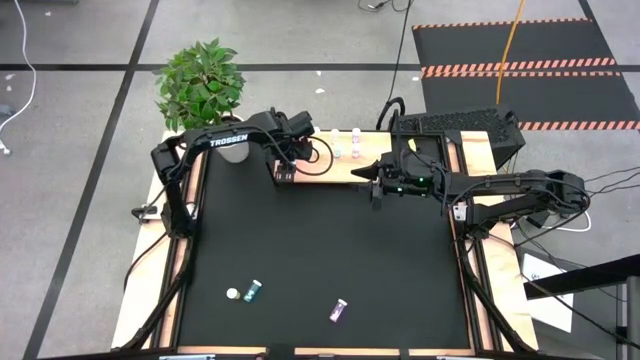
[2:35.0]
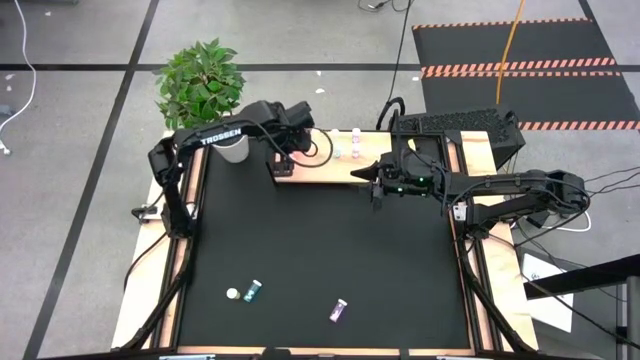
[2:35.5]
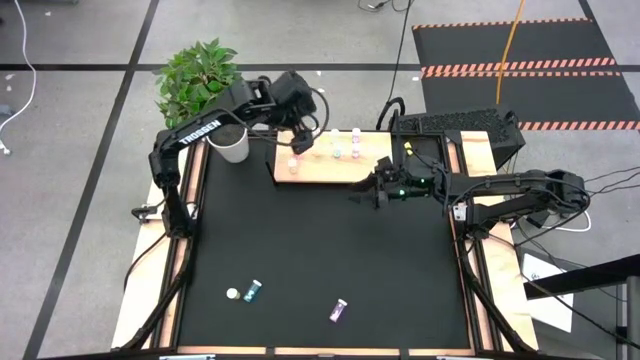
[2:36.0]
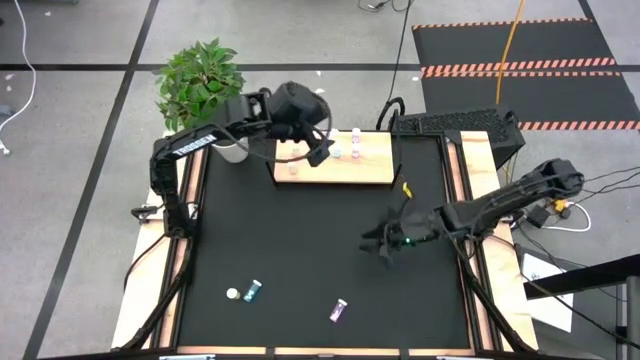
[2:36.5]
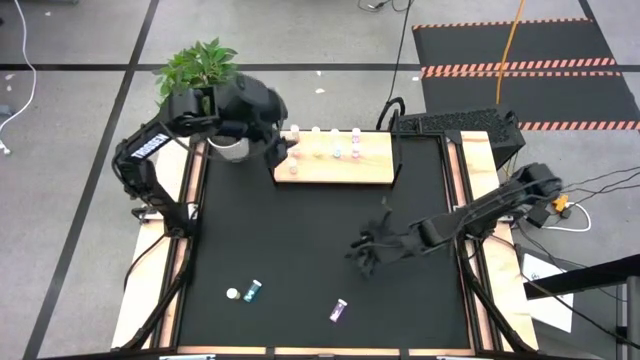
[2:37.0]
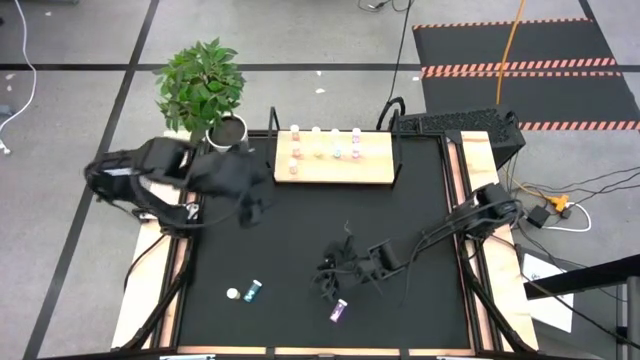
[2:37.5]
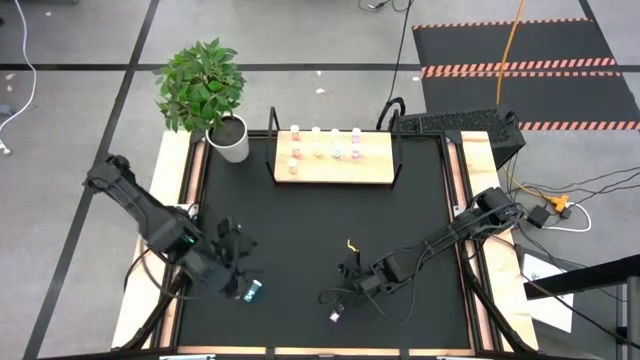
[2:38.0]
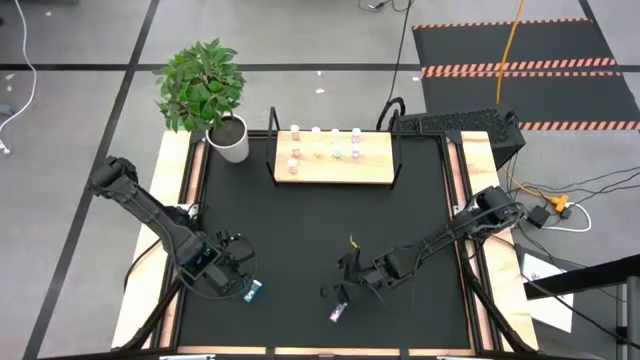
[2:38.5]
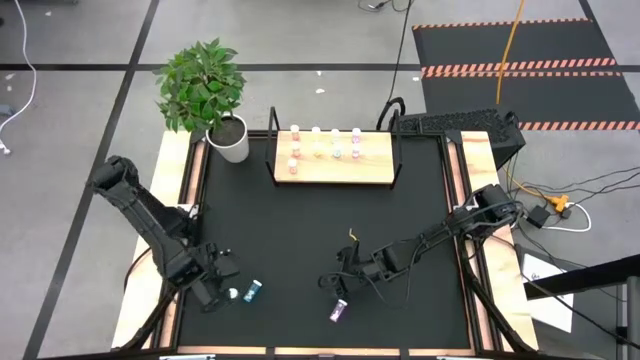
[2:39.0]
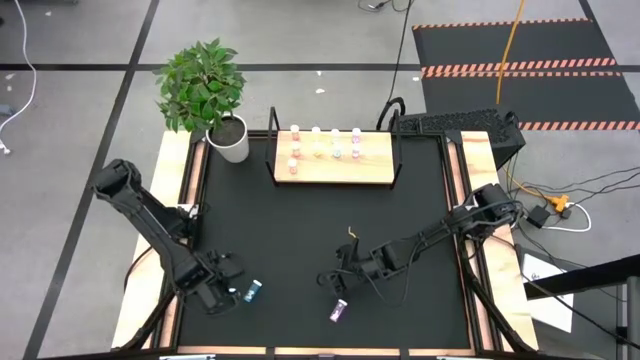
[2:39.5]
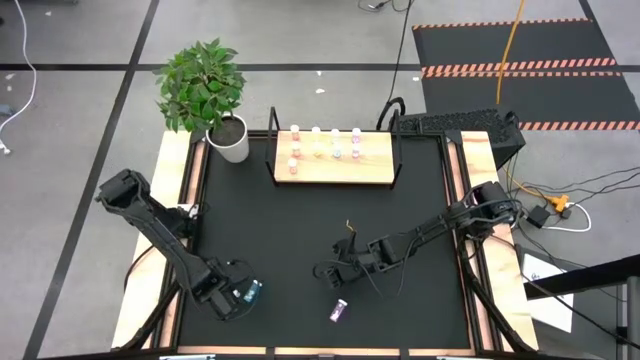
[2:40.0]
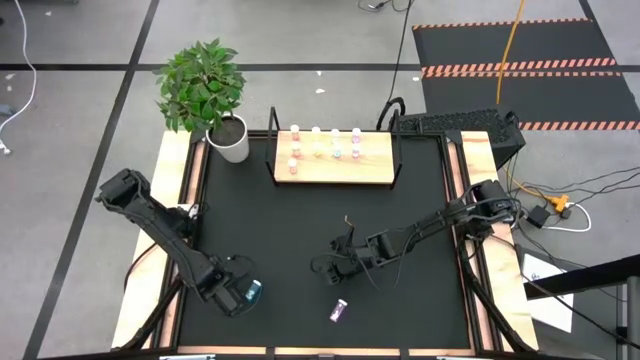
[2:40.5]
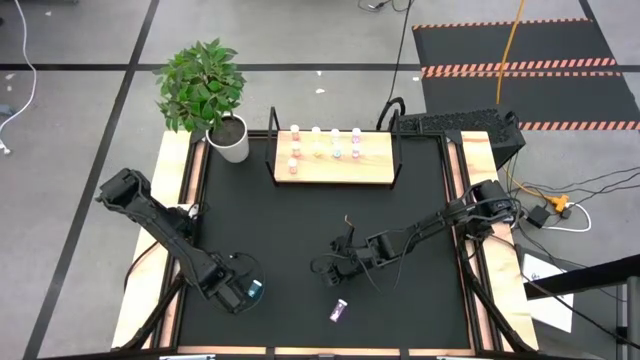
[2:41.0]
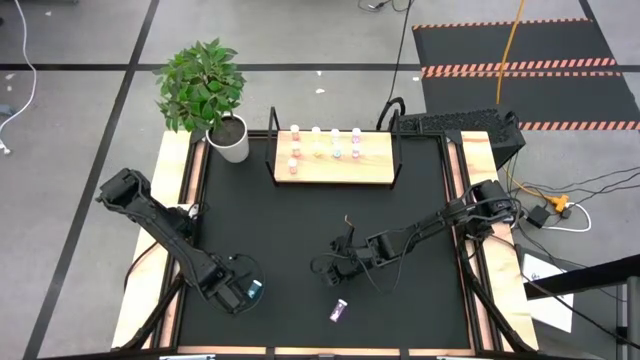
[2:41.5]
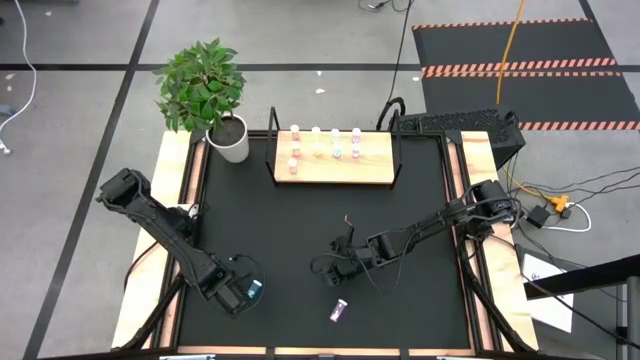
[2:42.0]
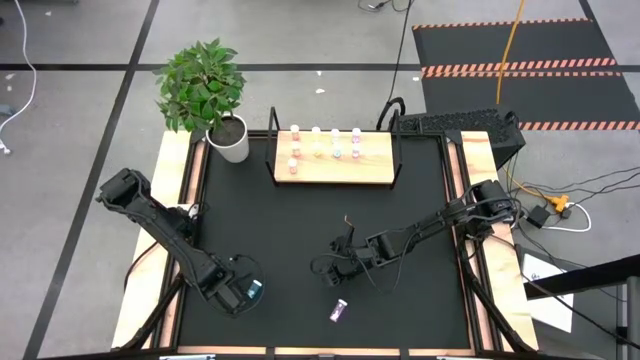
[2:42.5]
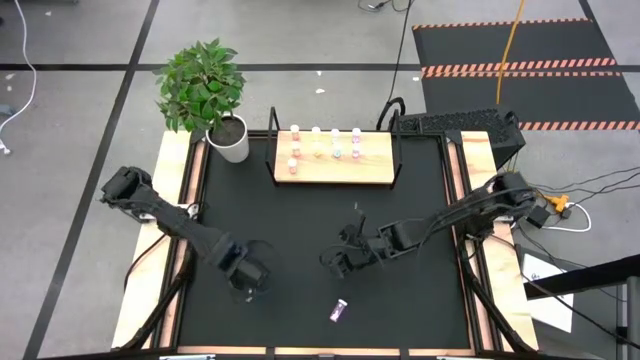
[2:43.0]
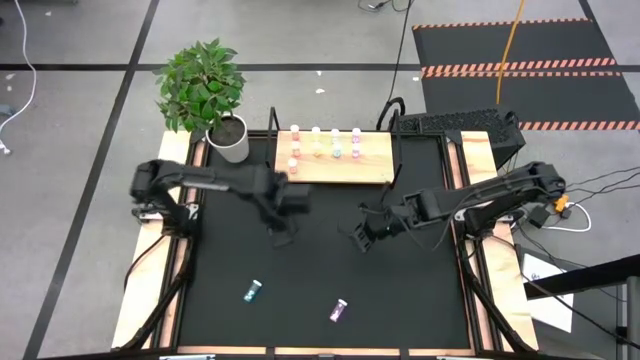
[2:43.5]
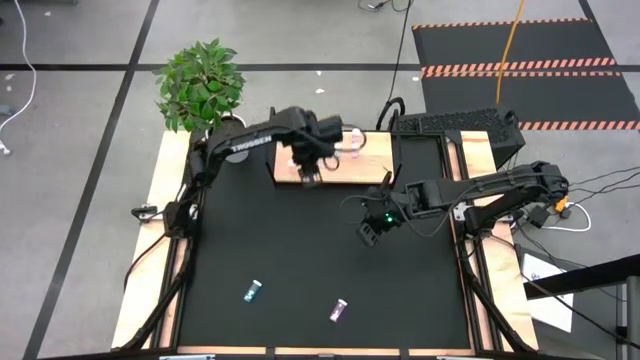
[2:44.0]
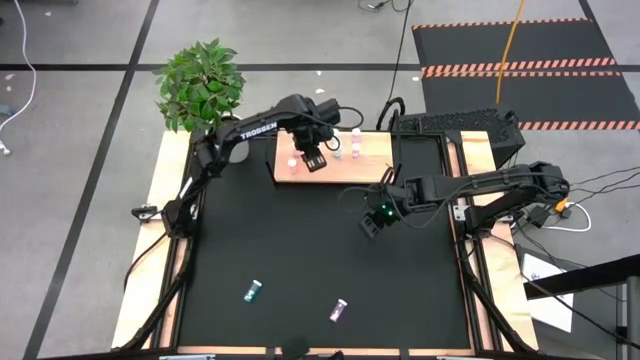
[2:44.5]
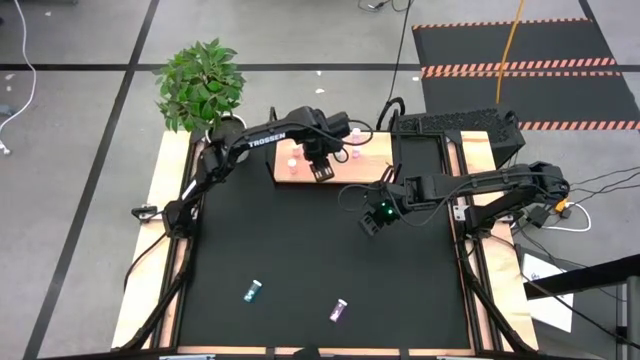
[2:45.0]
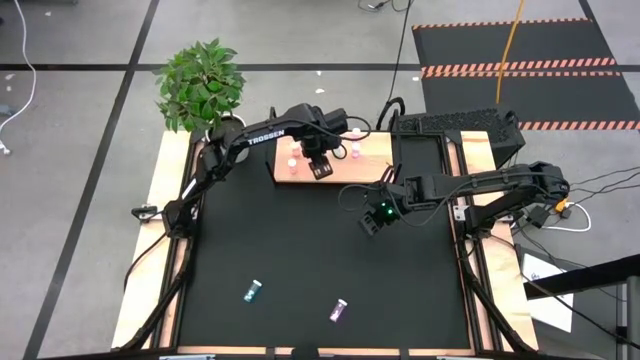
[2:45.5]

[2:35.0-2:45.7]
Task: Pick and place medicine bottles onto shelf by color
Put the yellow pill bottle on the shelf aligned with the other yellow pill bottles

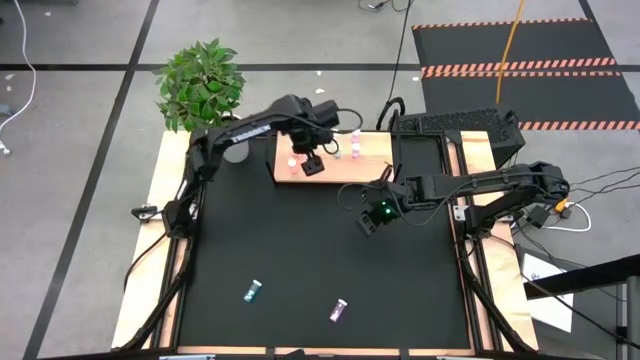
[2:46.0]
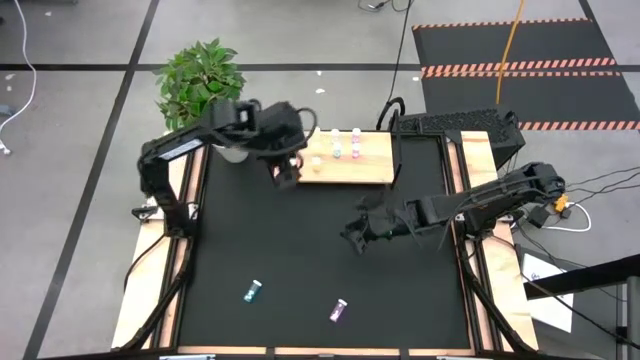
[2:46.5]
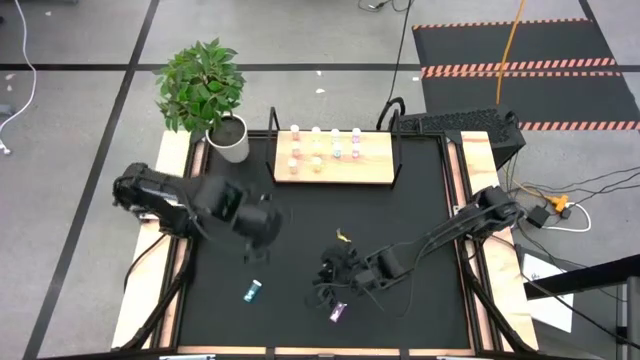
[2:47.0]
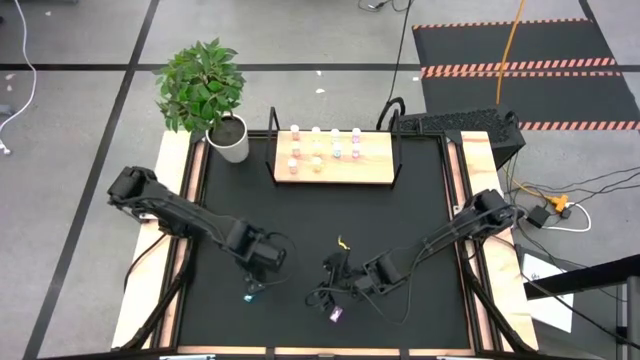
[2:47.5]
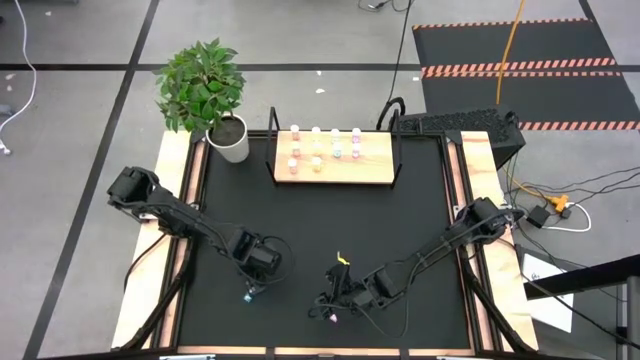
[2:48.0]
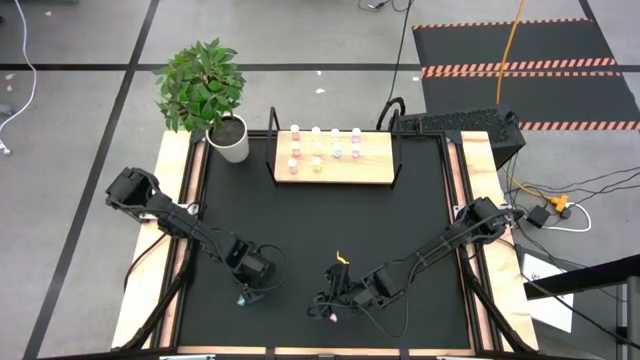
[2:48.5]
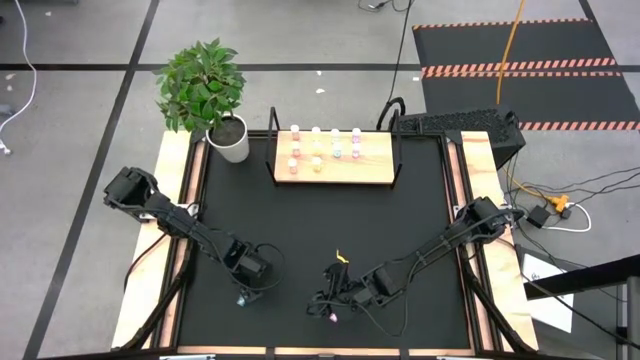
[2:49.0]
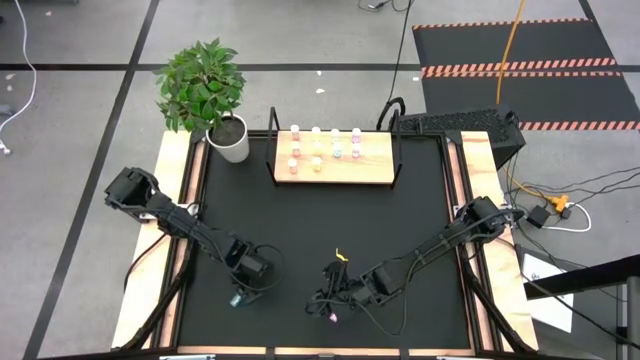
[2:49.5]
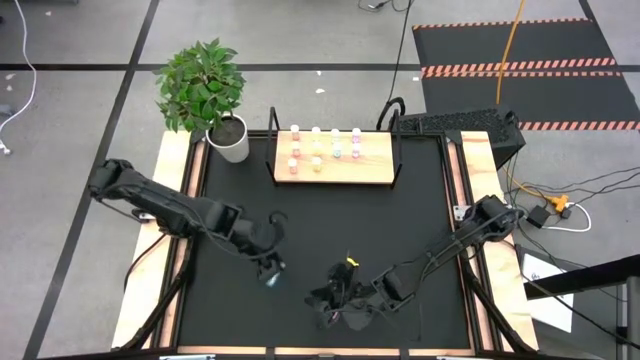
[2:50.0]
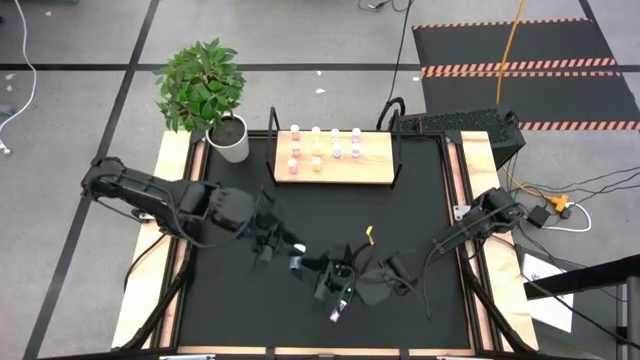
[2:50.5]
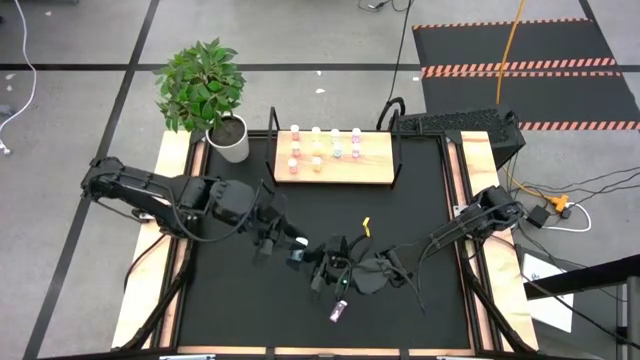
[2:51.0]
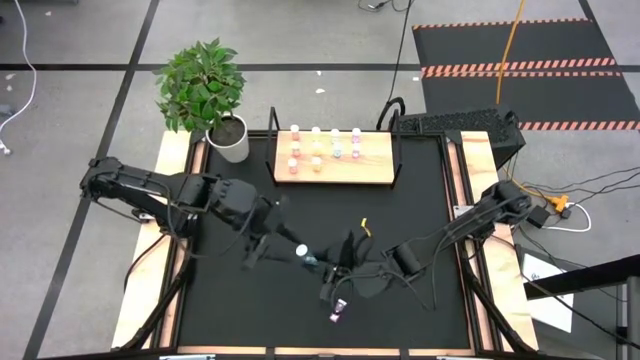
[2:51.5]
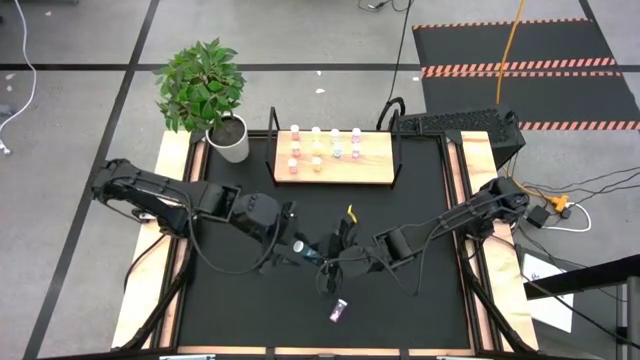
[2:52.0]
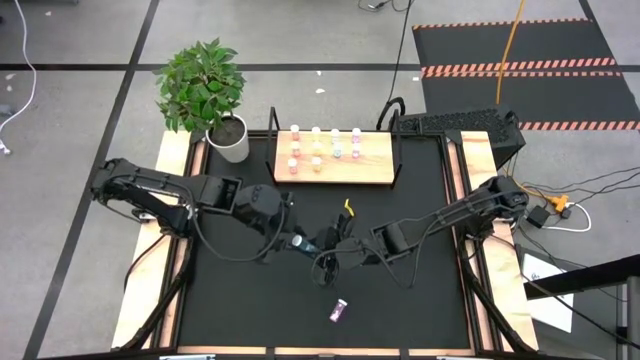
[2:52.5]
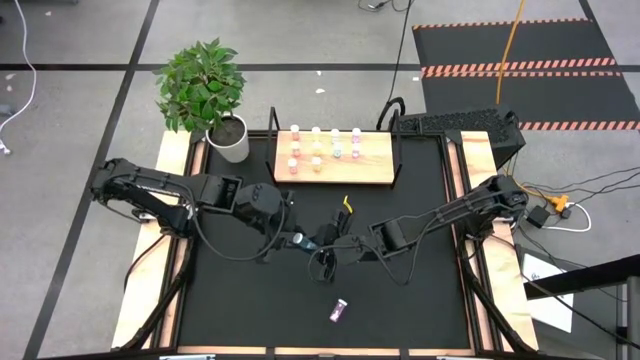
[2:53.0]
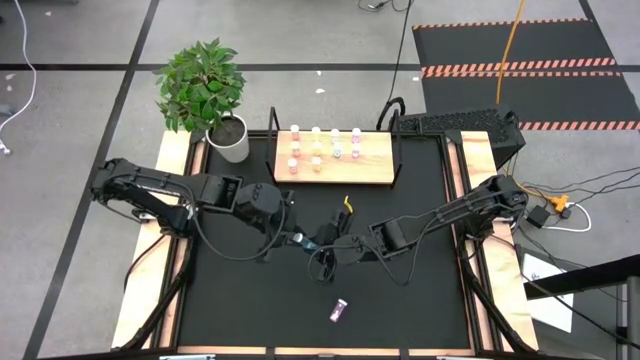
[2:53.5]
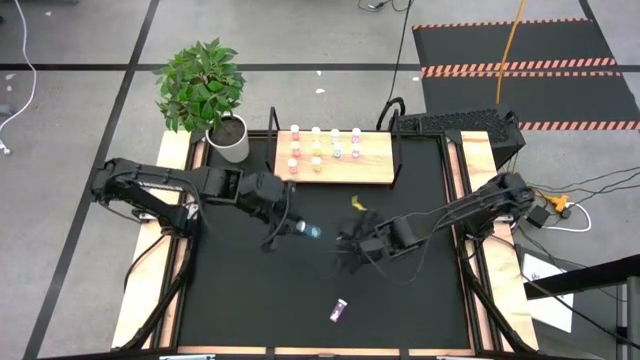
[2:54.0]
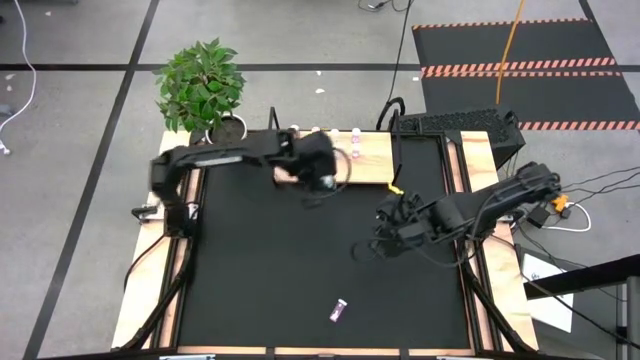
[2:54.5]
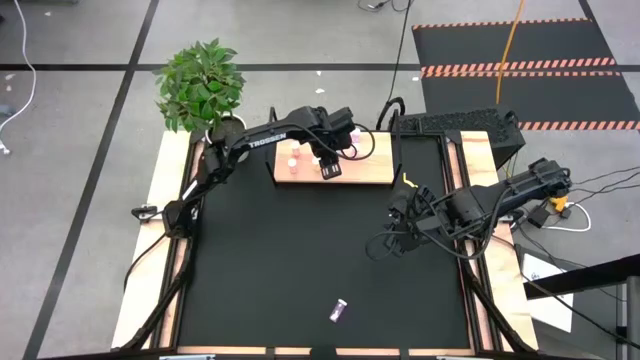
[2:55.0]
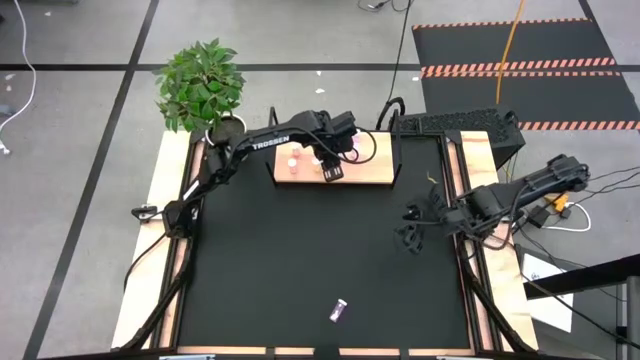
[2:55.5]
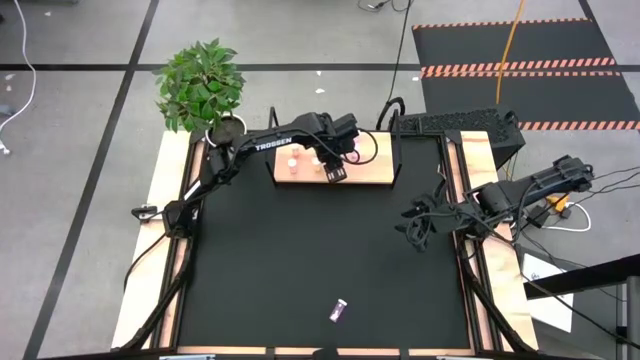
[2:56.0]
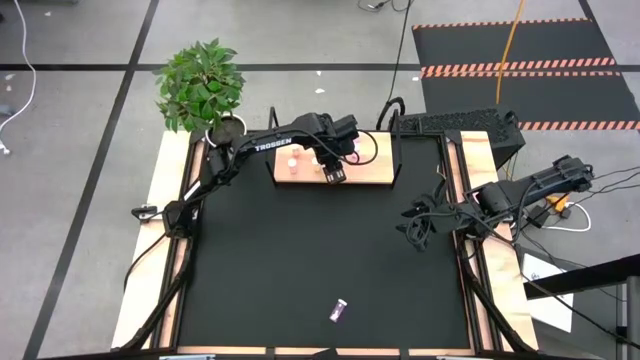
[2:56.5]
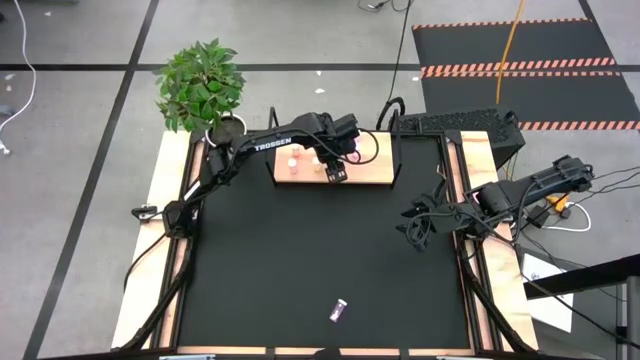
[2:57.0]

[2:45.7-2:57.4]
Put the blue pill bottle on the shelf aligned with the other blue pill bottles
